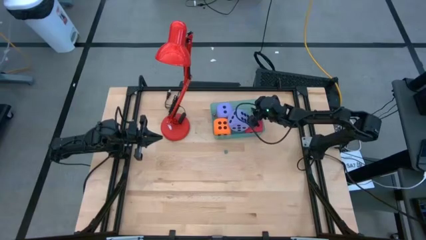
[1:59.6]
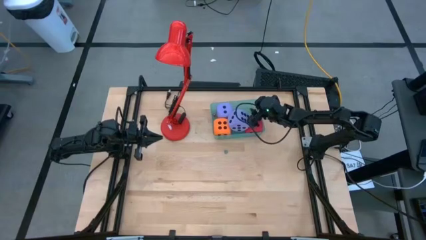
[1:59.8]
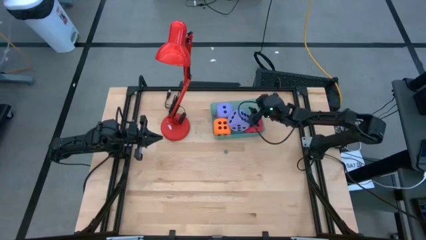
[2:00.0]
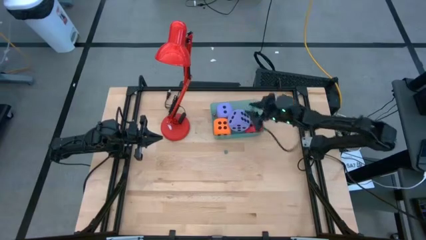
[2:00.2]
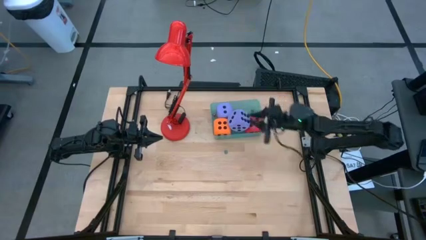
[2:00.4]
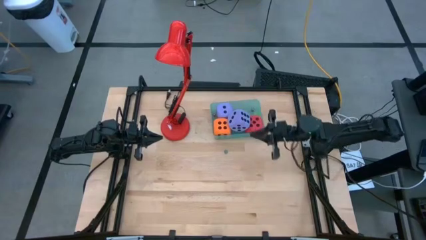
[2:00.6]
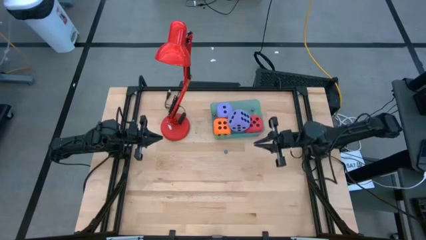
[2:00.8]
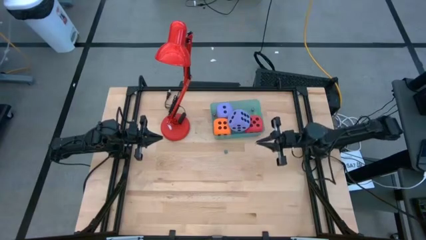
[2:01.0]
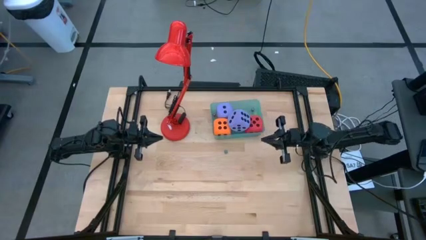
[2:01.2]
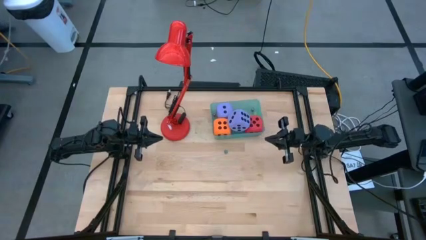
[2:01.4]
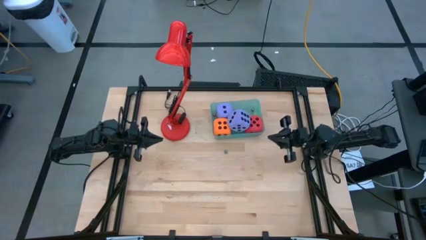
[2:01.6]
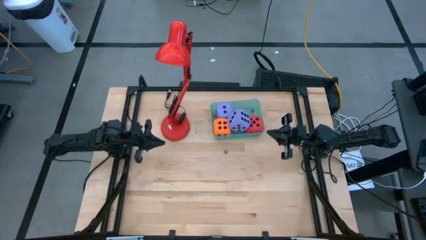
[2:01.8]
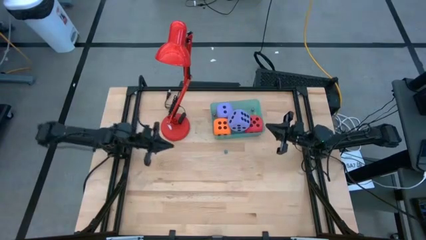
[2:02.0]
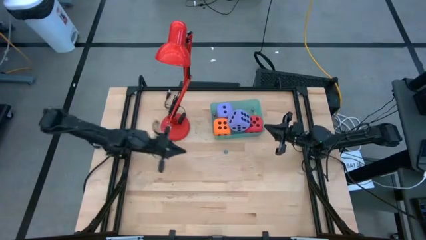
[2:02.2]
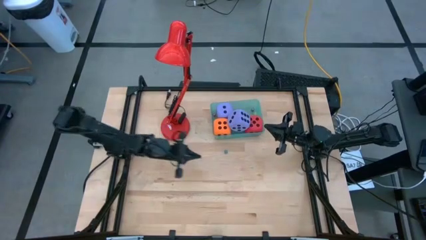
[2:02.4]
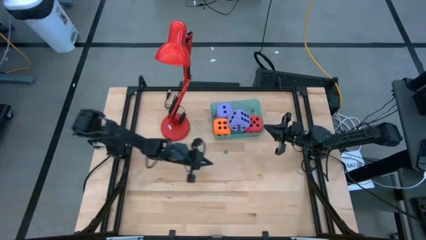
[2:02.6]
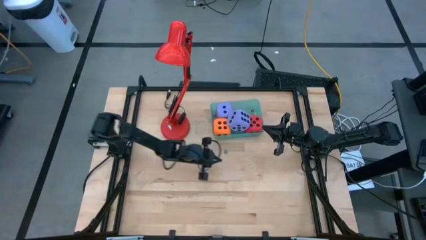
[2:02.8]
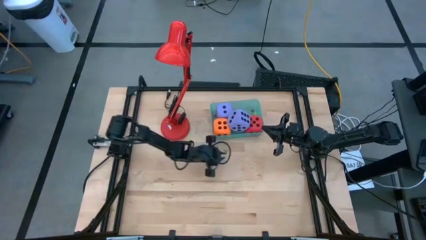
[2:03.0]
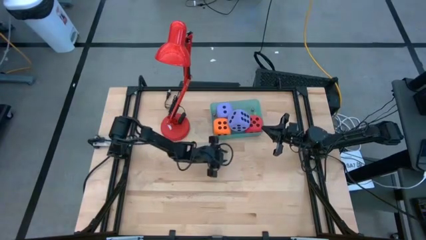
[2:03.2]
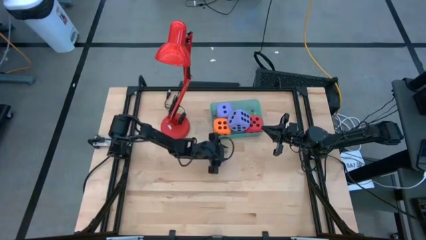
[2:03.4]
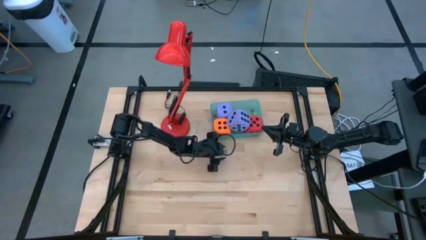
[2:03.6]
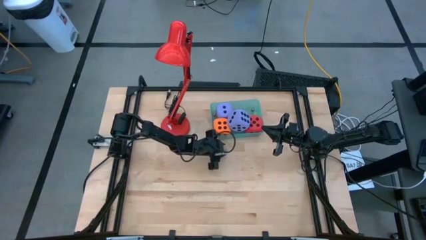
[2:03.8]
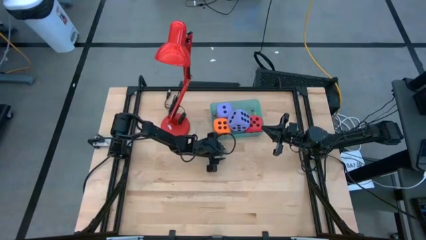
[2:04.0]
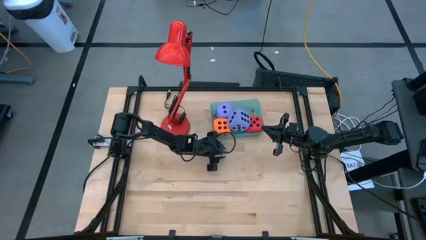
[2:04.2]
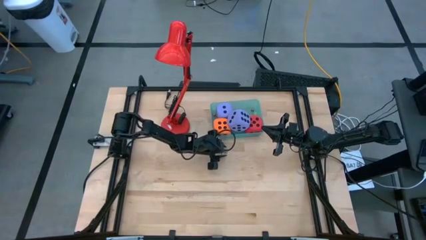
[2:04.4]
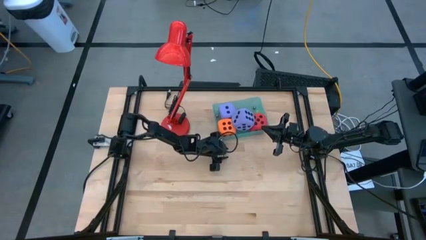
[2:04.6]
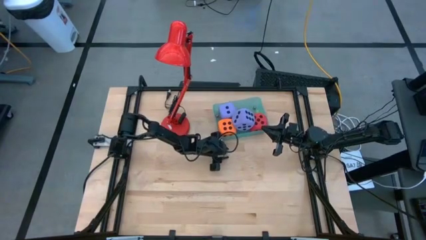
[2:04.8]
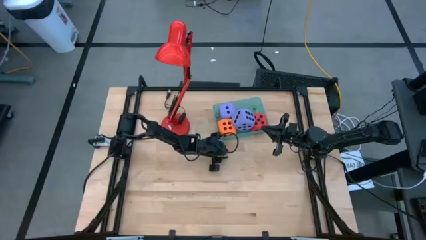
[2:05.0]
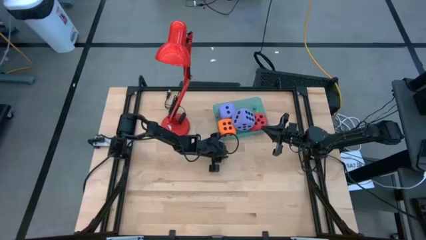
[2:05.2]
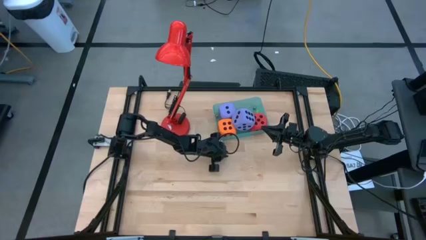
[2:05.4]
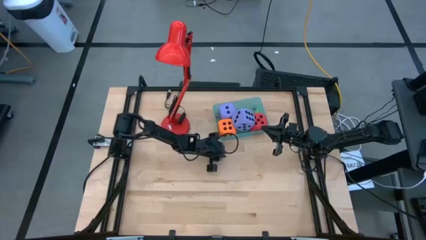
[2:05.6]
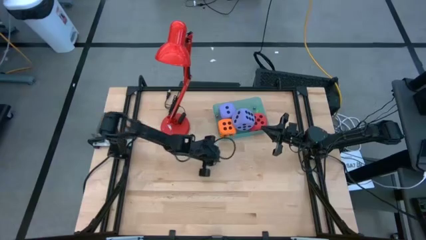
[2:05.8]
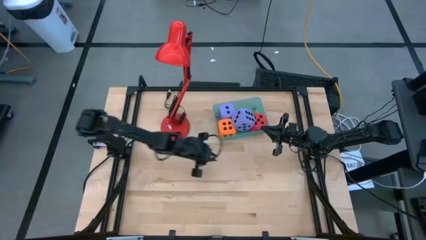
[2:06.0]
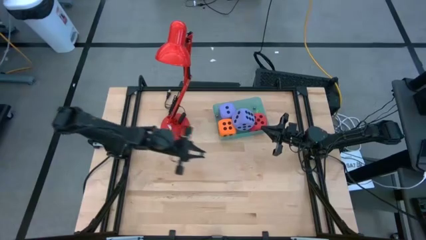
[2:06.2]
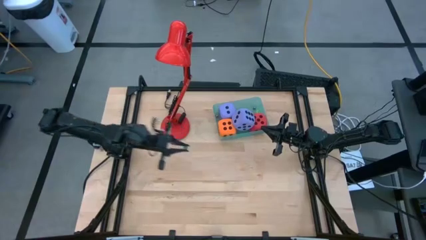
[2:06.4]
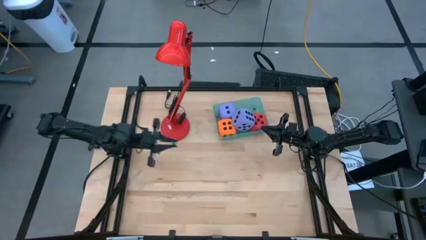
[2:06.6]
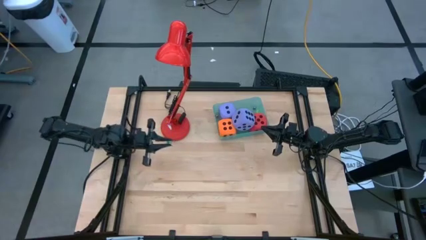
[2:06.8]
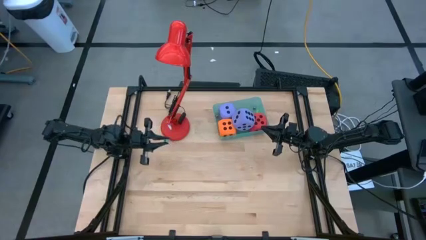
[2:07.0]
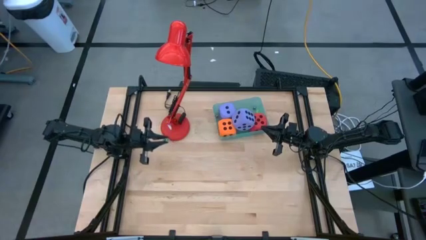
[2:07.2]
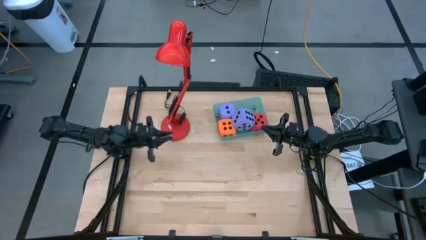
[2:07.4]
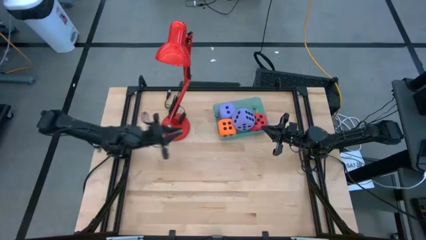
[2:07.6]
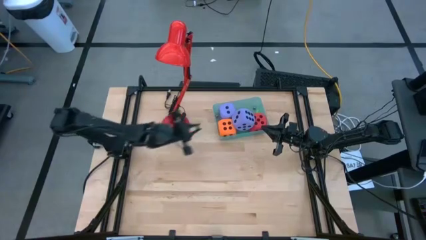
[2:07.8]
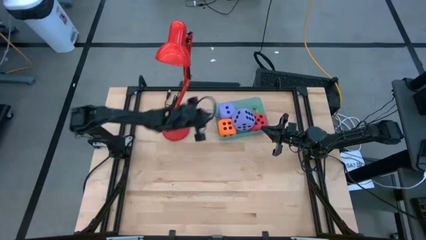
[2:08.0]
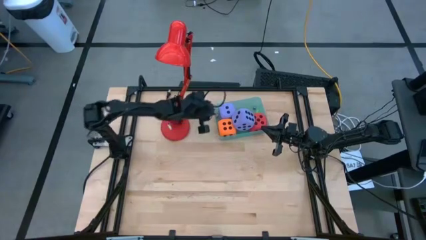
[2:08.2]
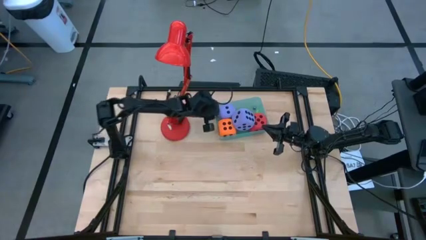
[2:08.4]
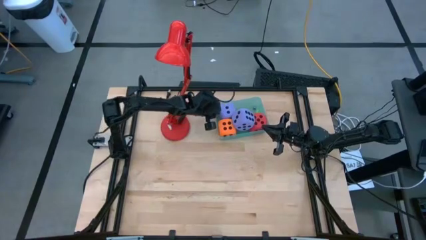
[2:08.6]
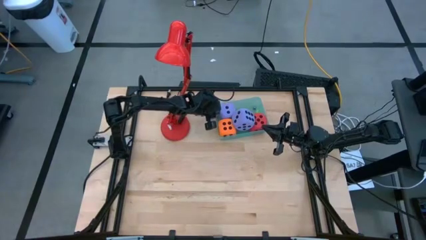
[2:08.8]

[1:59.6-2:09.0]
Task: Pick & Place Dice
Put the small green dice into the bin

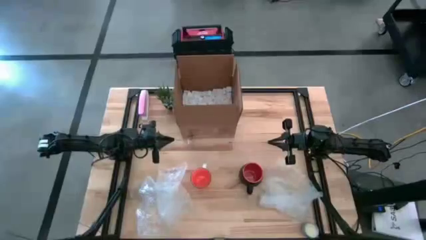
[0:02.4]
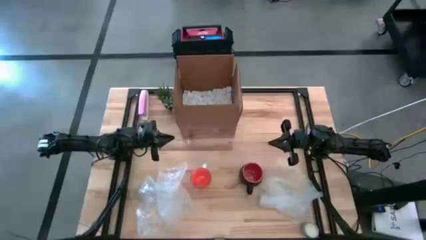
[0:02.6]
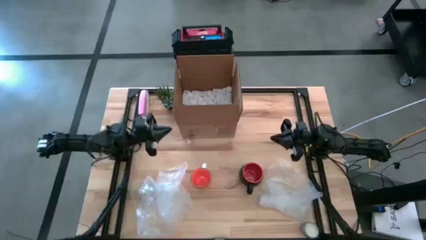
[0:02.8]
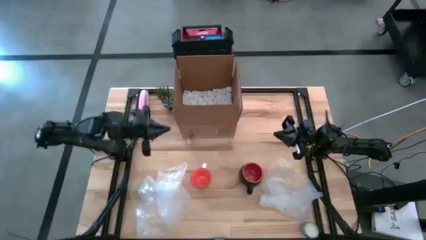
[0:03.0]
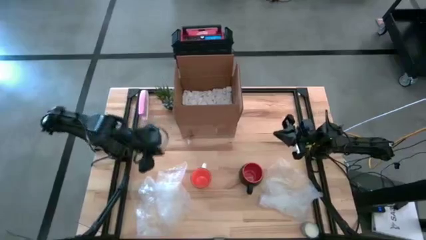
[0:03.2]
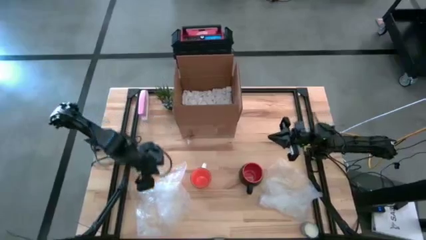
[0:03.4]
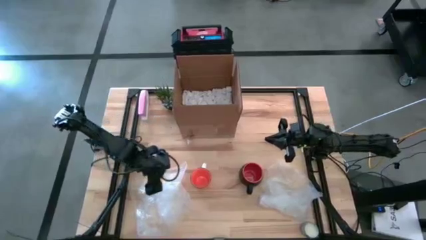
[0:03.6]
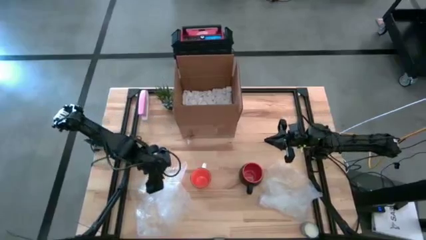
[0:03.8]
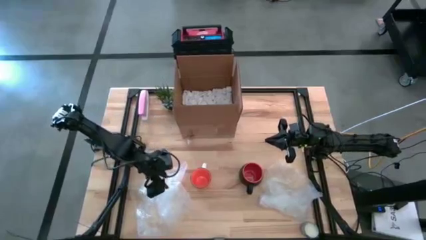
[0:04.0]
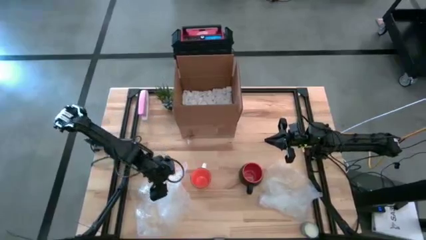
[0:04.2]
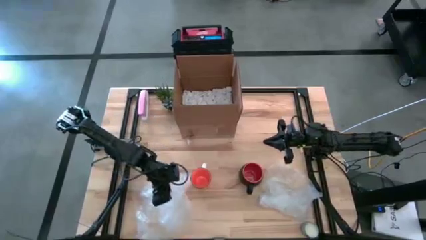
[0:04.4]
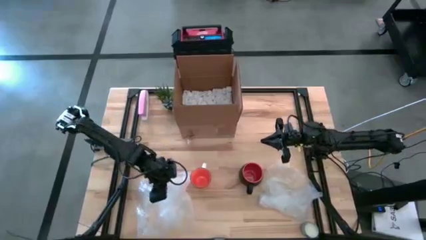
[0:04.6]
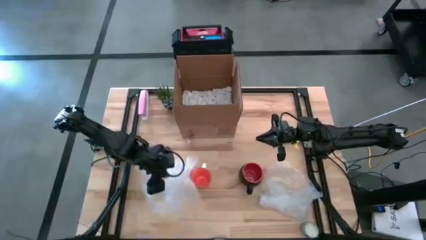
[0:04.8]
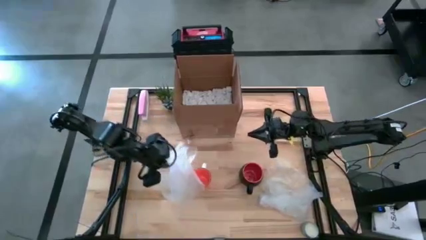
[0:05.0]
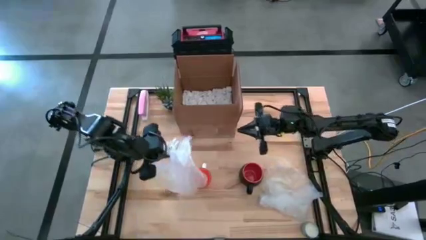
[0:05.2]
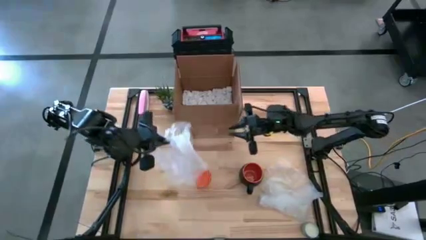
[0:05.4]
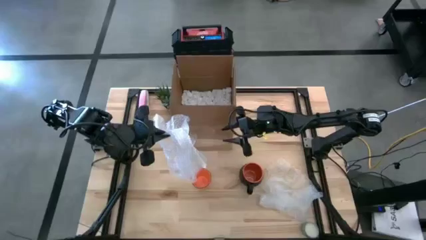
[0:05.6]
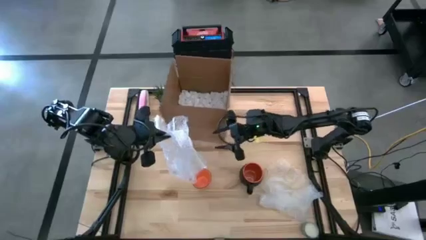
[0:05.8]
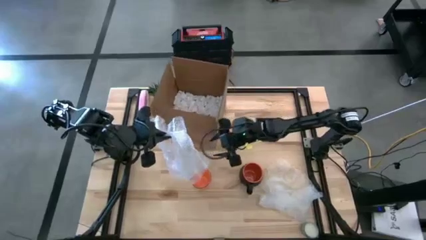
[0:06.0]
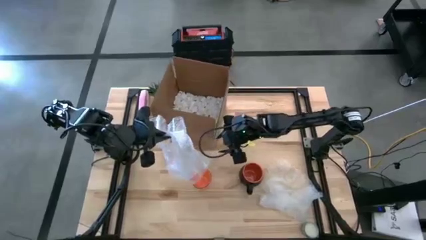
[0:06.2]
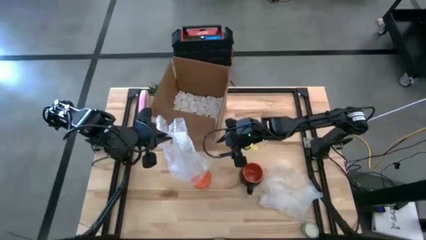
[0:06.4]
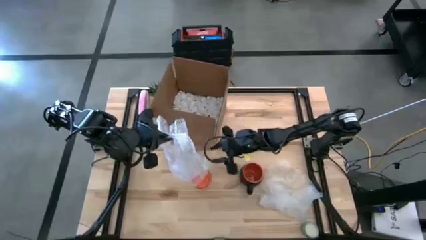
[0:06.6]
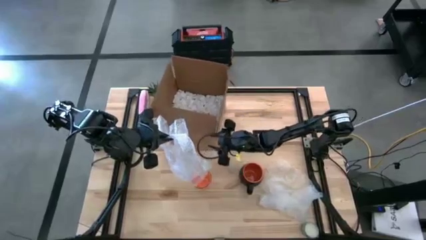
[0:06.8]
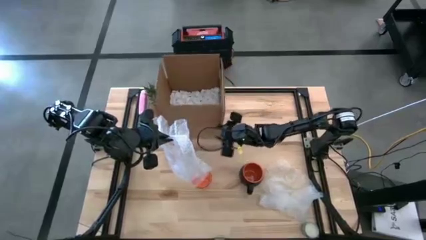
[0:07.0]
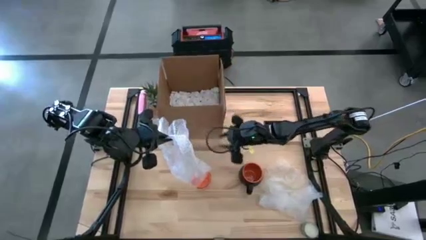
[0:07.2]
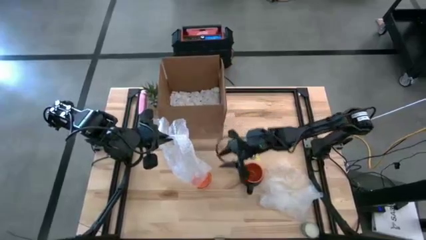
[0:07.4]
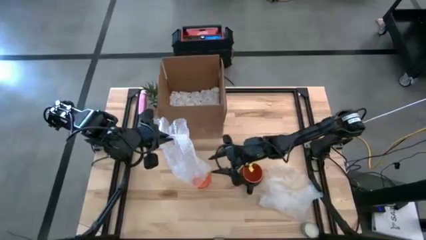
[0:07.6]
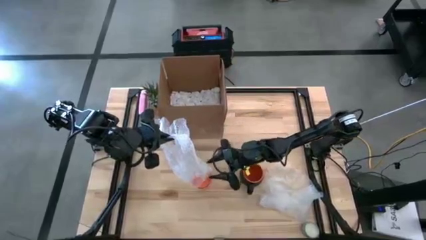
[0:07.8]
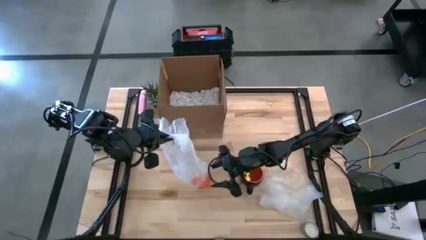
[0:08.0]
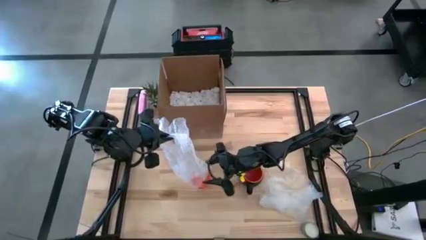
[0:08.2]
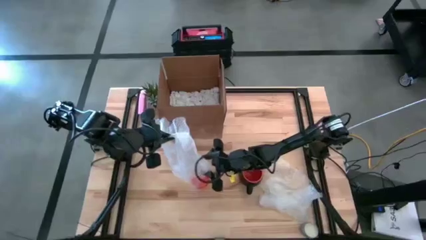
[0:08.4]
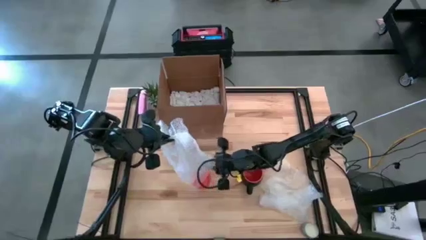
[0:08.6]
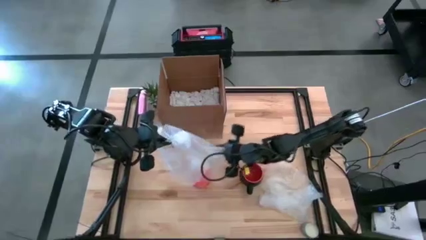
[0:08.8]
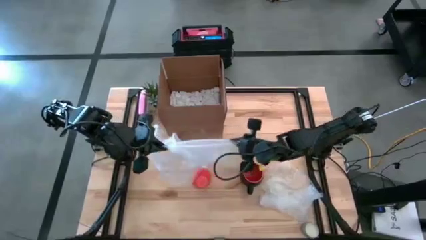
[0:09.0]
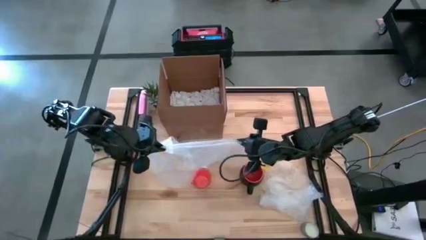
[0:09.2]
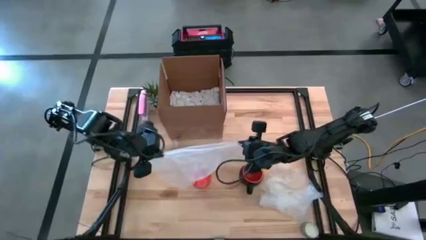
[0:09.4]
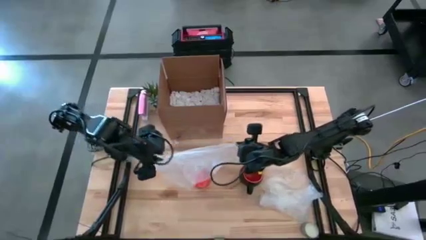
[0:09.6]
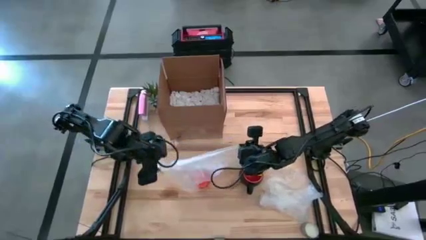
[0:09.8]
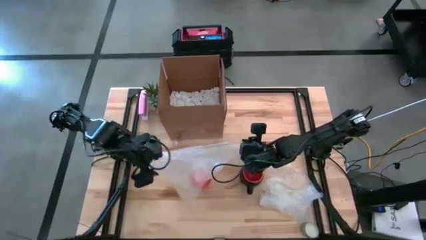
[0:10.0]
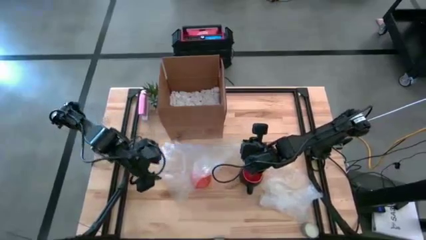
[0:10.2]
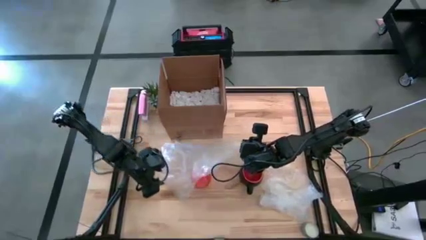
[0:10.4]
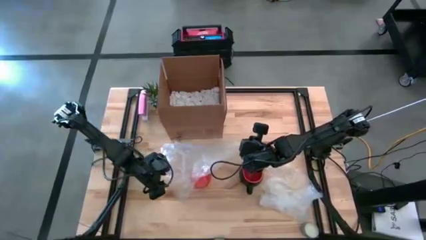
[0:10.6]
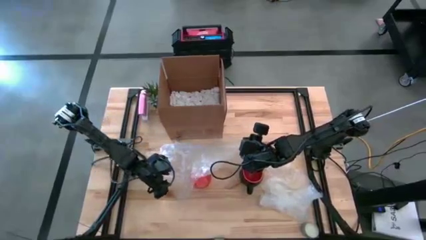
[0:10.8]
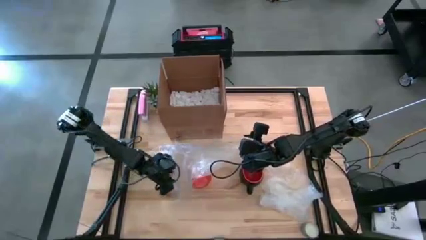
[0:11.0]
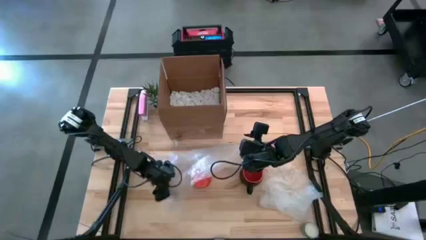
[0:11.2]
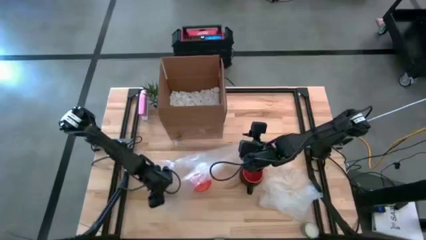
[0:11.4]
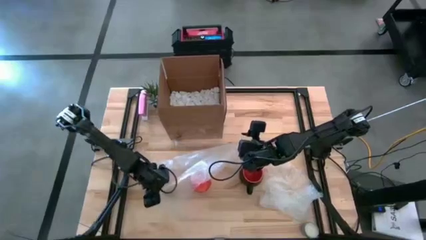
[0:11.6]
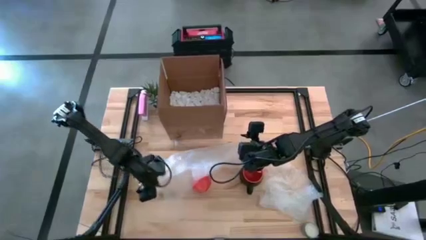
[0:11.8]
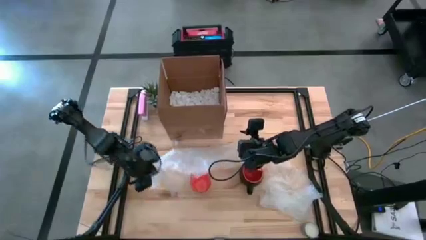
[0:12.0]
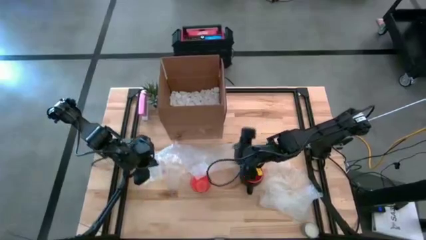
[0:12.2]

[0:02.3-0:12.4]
Task: wrap mug
Prepare the left transparent bubble wrap
